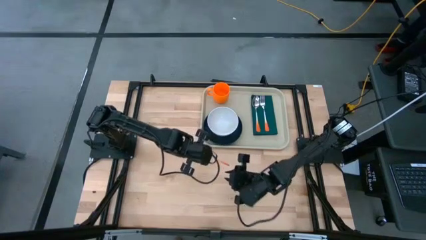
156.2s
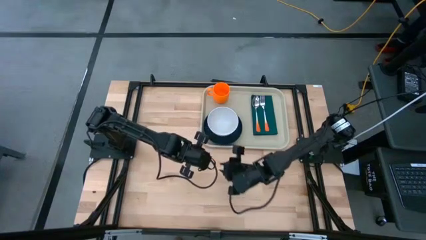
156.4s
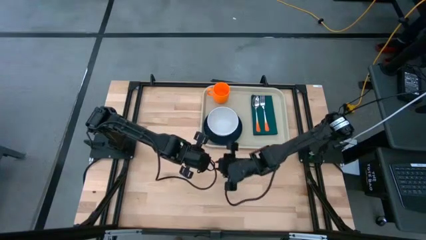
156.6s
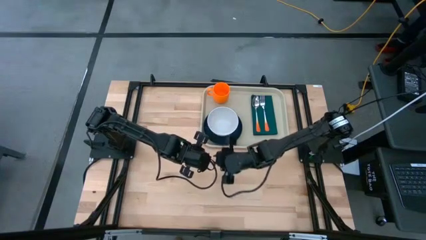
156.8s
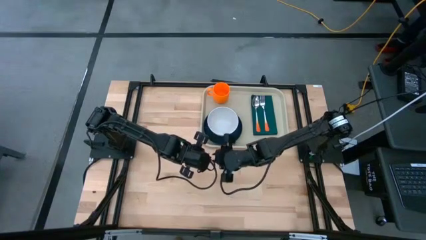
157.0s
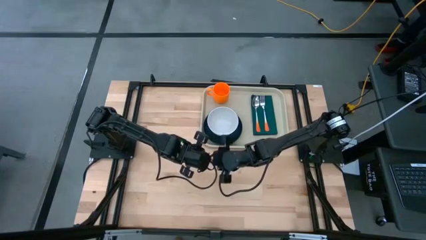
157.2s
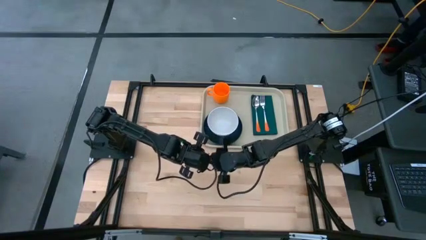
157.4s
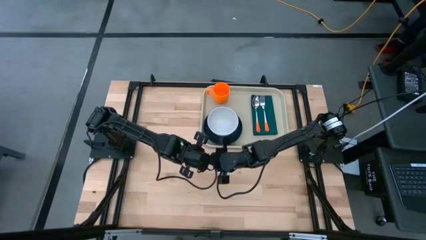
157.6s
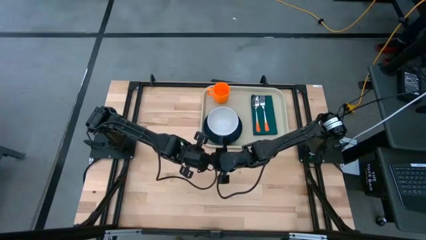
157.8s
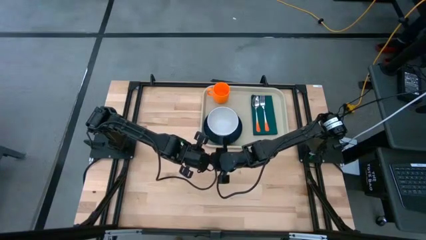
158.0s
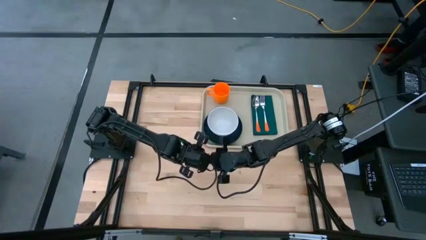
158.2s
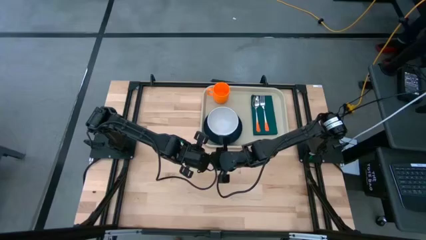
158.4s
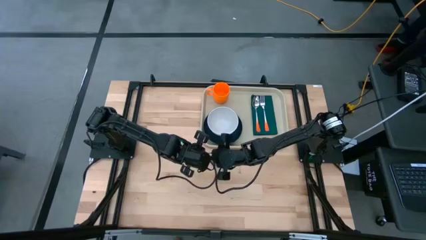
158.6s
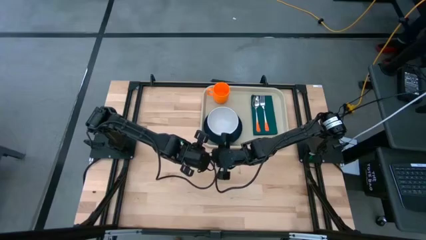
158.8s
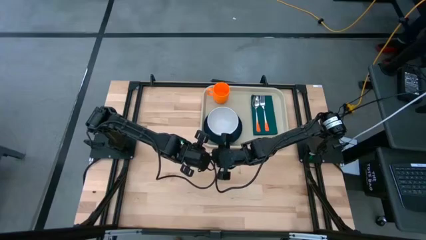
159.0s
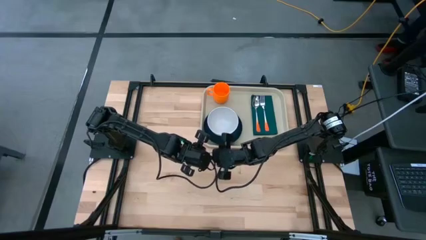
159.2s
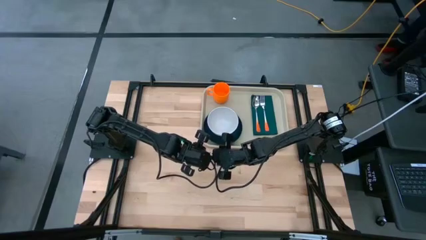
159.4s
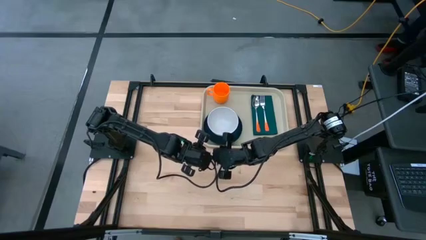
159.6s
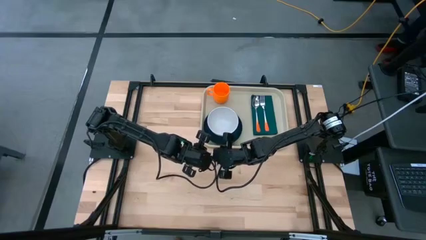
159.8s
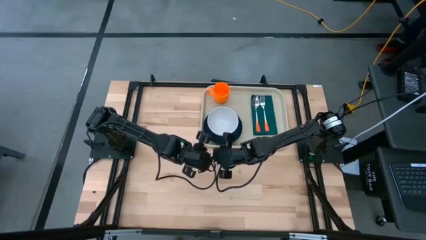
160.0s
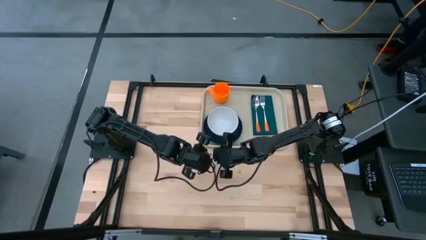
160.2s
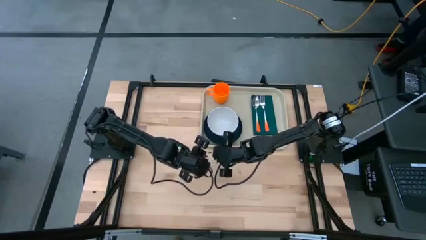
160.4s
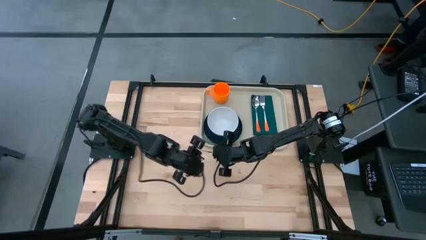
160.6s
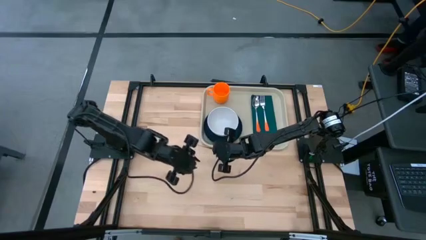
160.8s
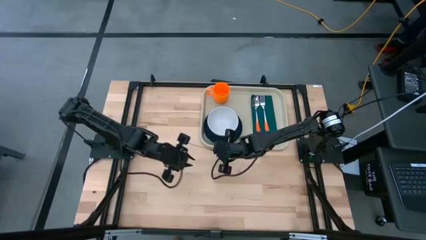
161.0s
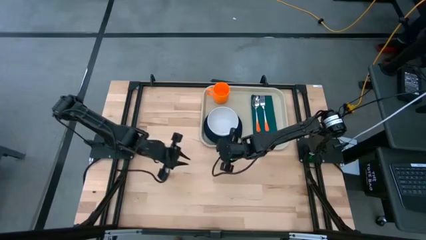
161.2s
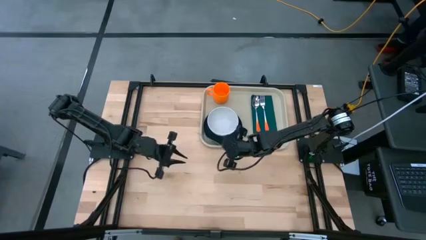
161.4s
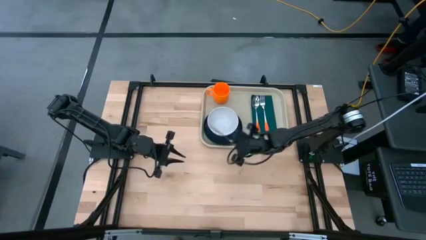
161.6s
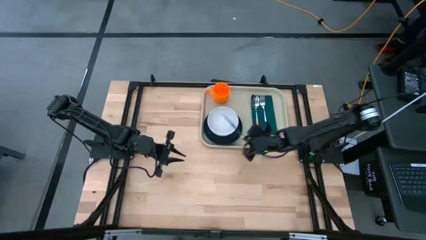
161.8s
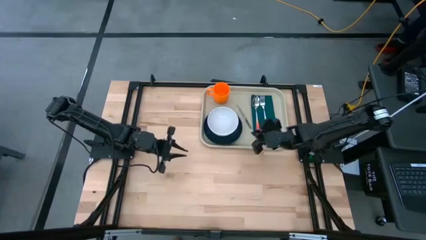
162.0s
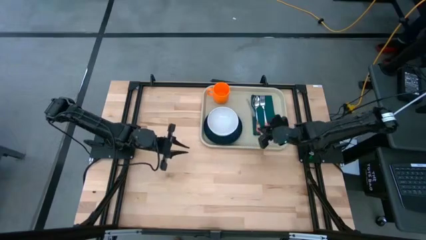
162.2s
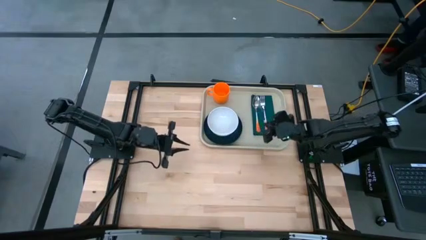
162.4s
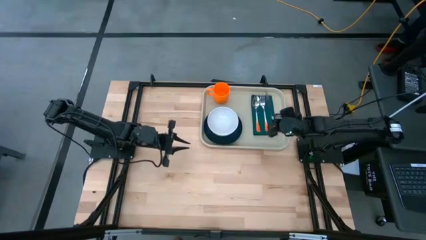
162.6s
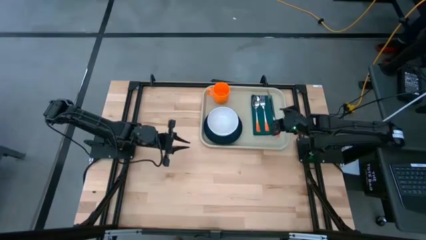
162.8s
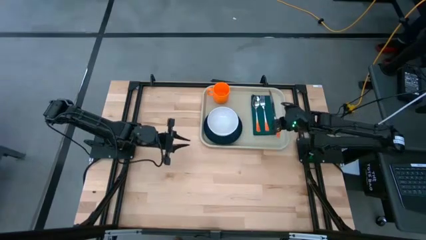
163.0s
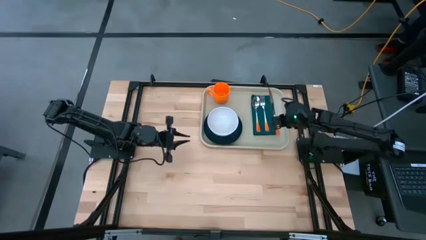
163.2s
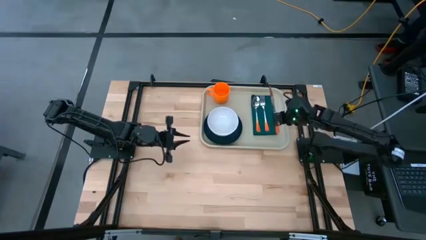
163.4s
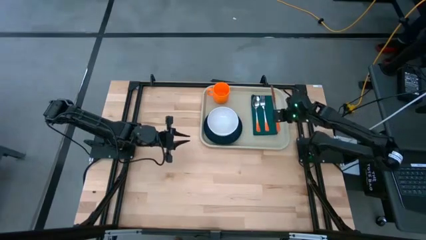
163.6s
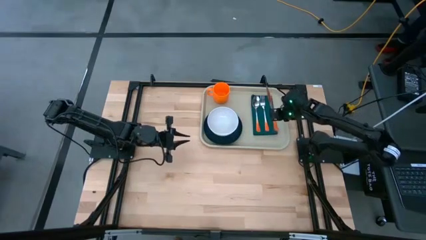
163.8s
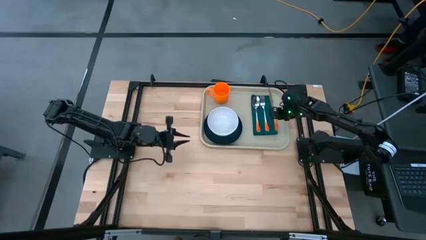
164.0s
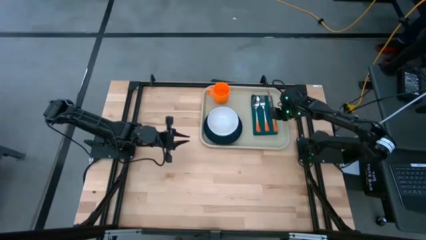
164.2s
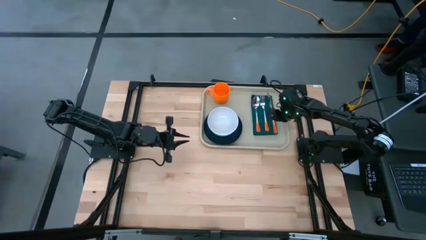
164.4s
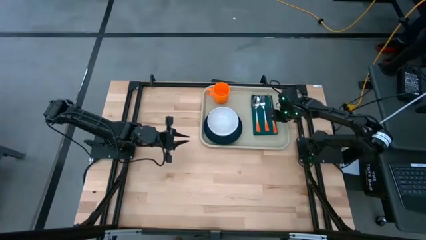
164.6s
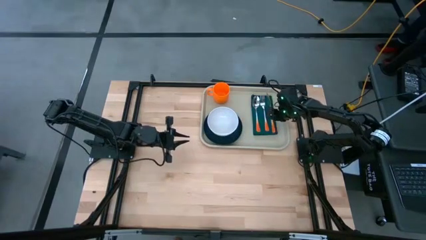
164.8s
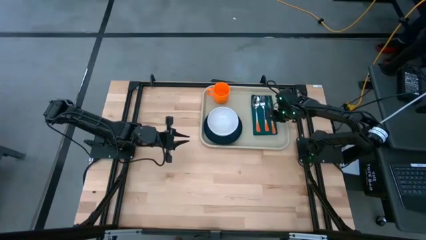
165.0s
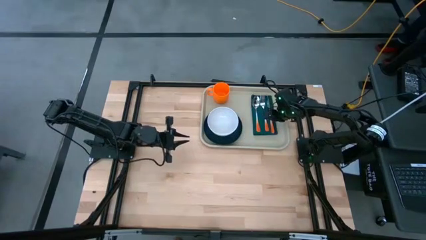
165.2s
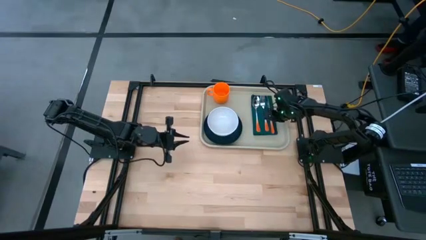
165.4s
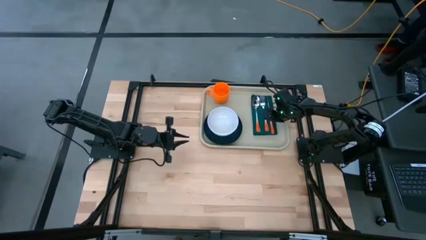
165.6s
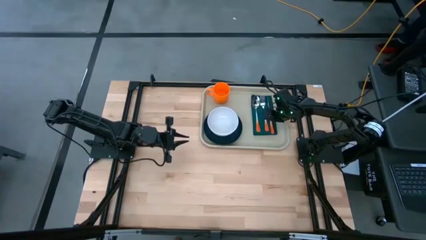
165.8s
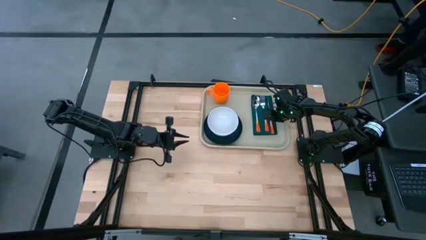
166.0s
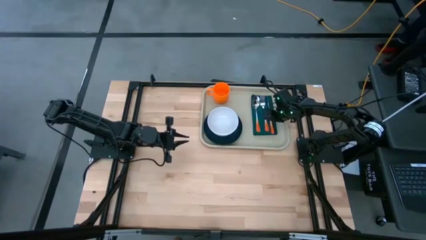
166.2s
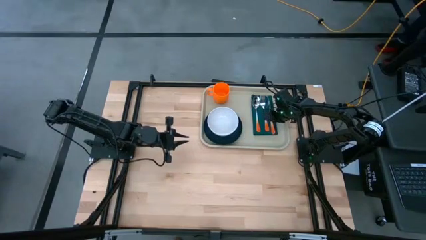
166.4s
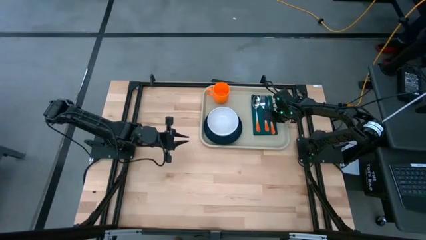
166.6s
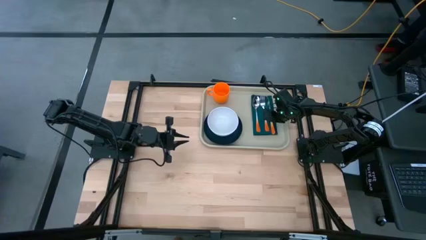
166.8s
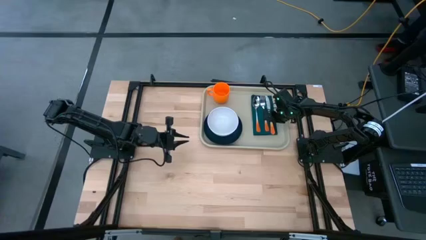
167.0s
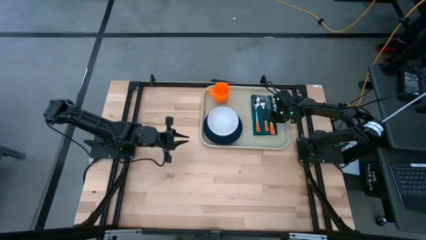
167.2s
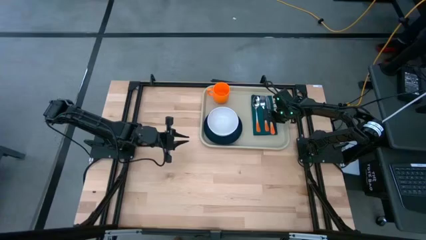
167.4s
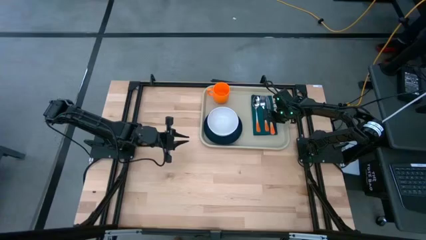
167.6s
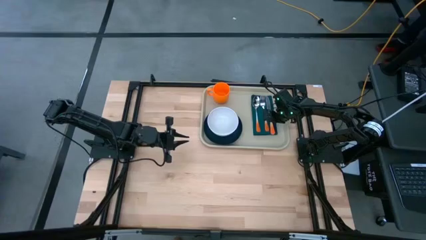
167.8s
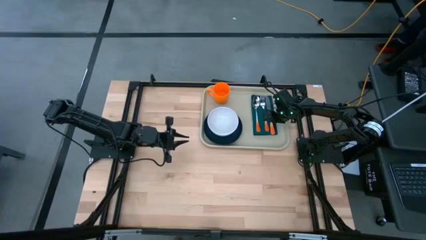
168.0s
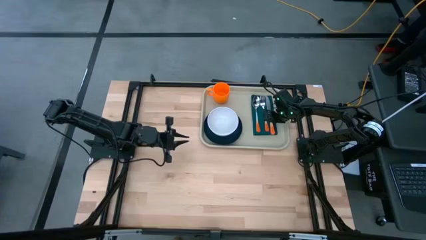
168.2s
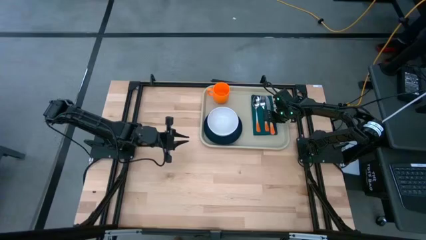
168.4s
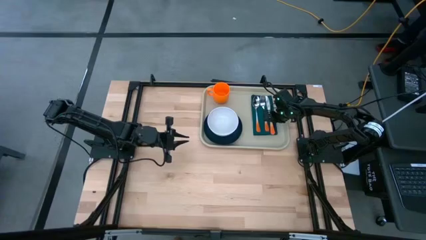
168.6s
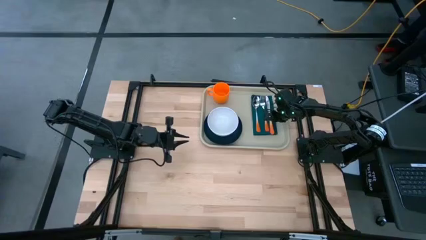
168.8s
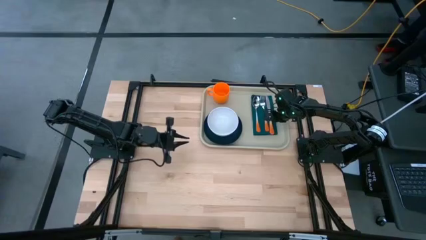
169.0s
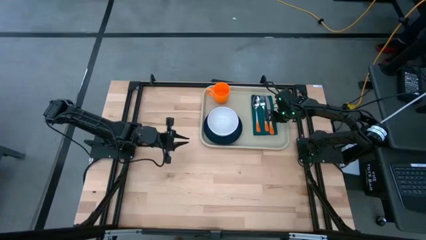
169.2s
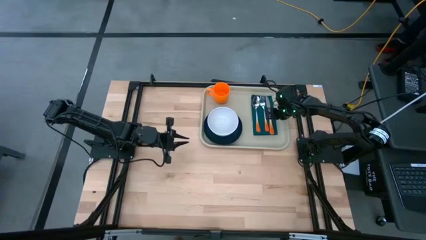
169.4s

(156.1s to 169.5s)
Task: Set up tray
Put the orange knife to the right of the orange fork on the serving tray

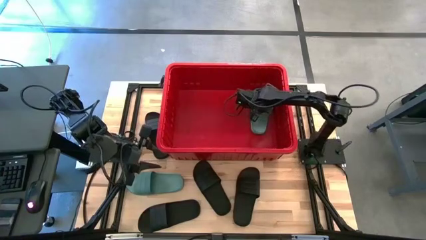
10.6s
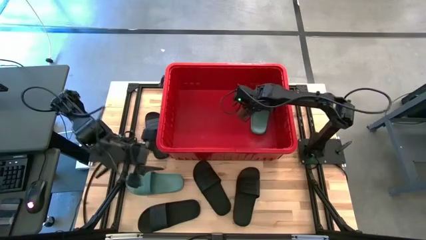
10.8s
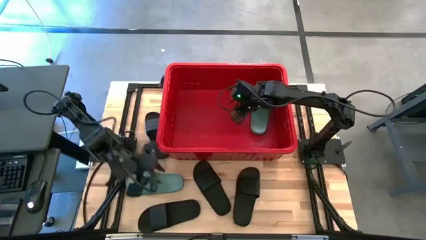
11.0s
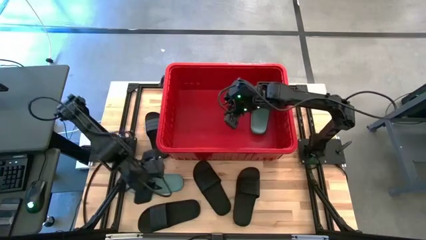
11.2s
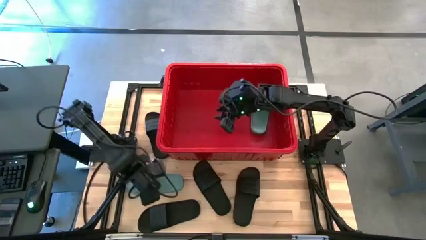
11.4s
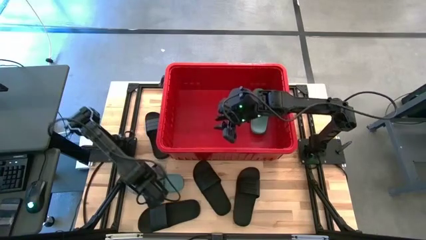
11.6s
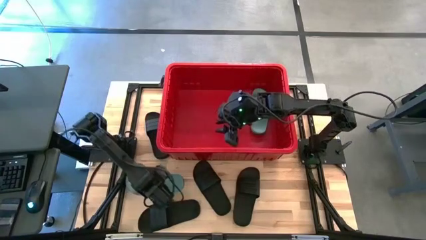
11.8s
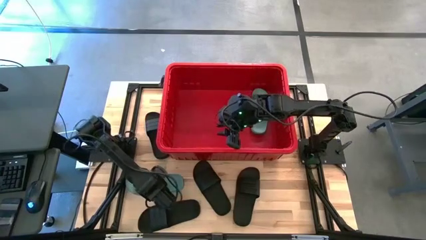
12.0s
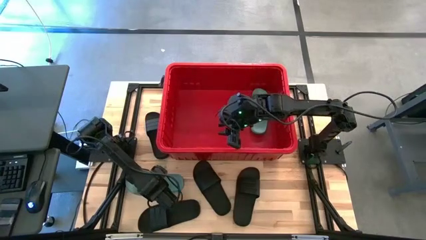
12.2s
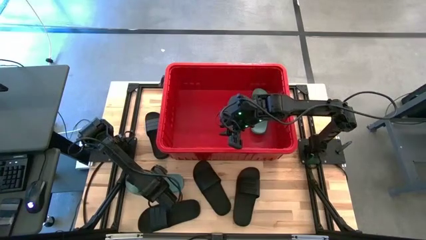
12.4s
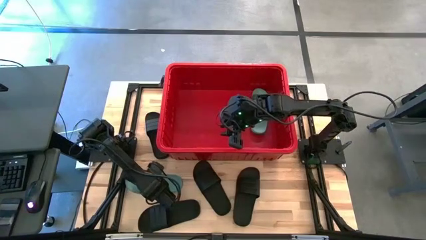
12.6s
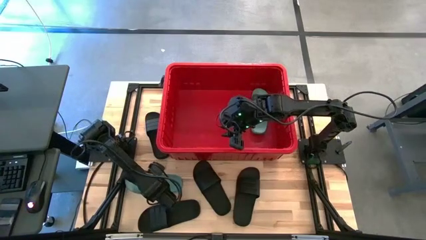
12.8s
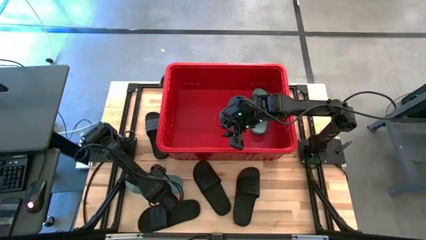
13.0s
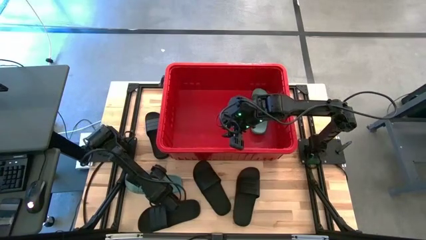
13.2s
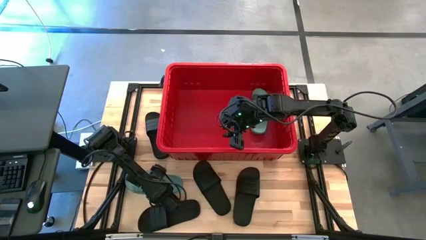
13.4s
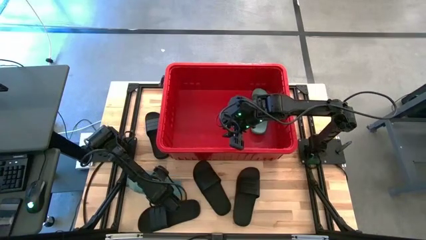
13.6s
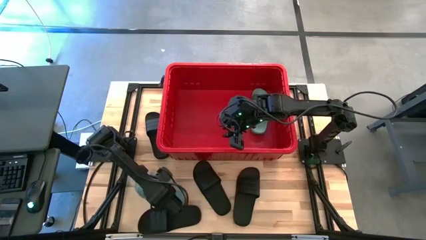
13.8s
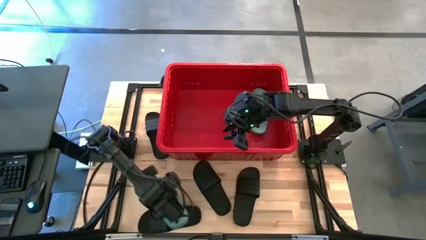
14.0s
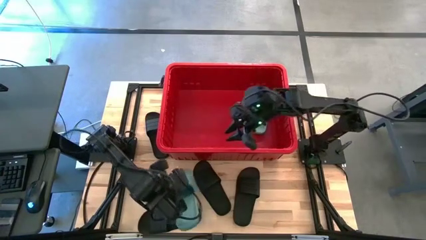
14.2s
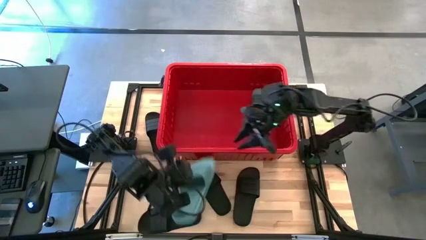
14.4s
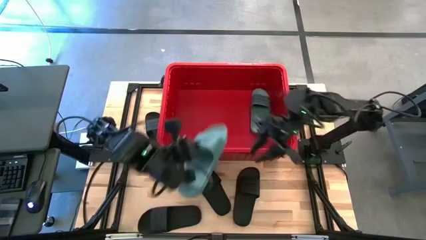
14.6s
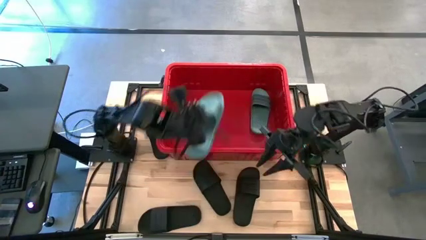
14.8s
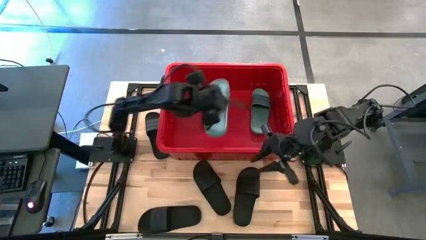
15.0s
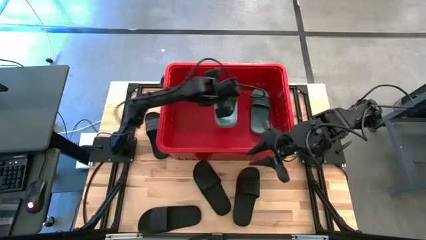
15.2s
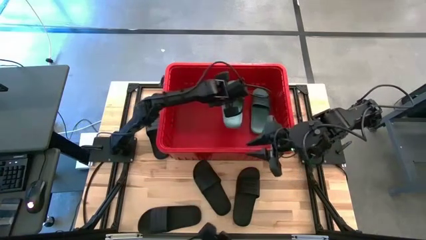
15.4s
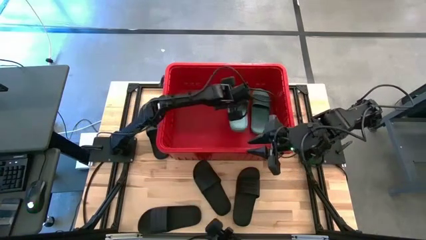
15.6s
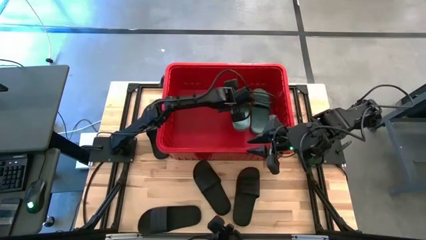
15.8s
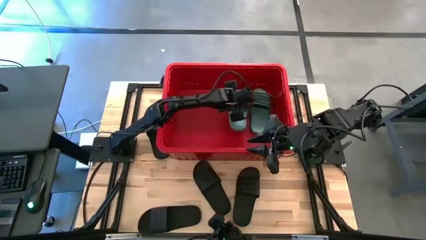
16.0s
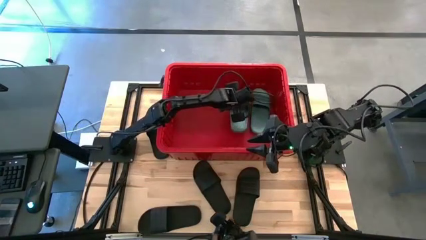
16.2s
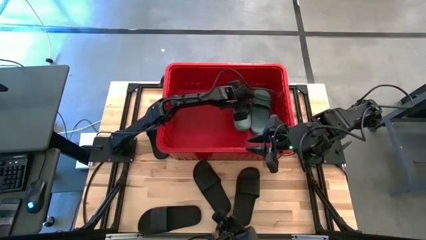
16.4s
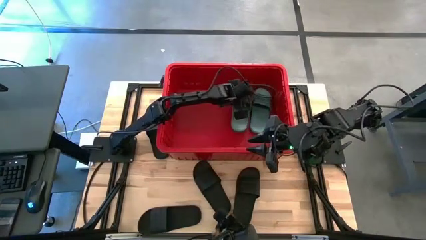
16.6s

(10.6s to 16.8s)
Task: Pick and place slides into bin
Put the green slipper into the red bin
